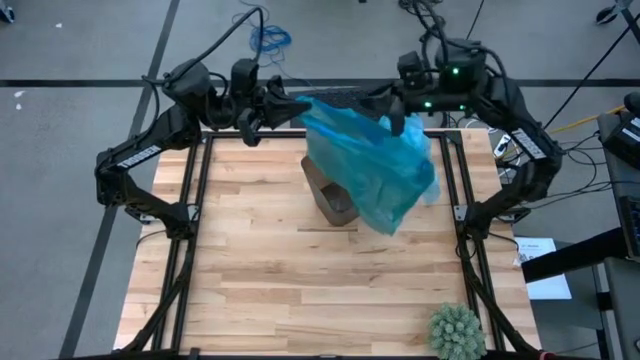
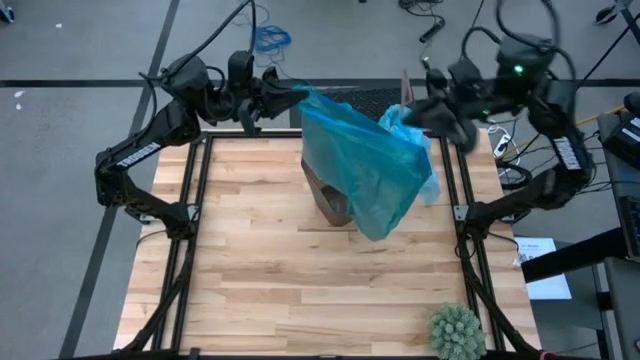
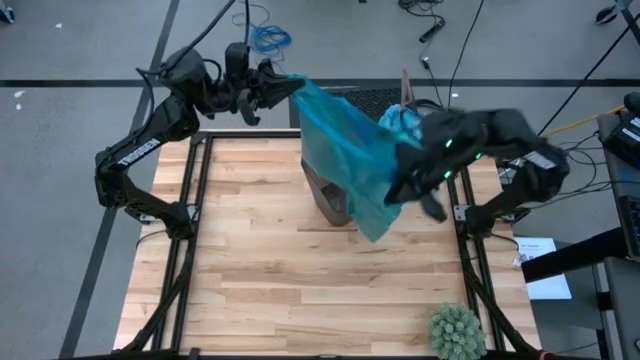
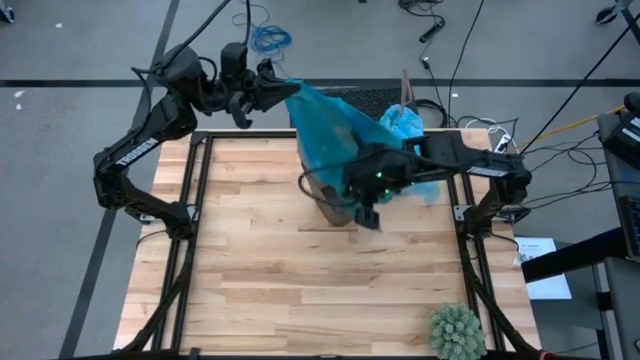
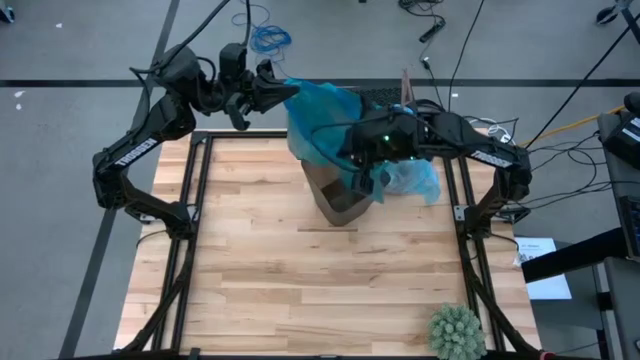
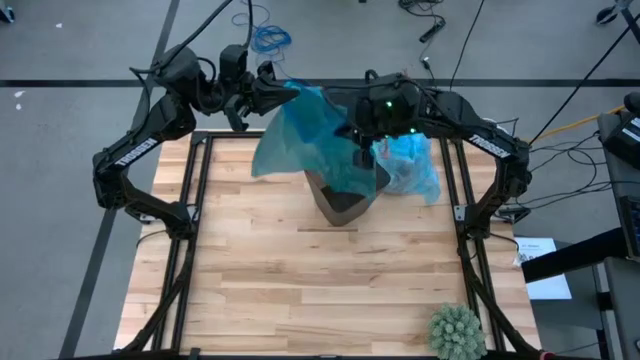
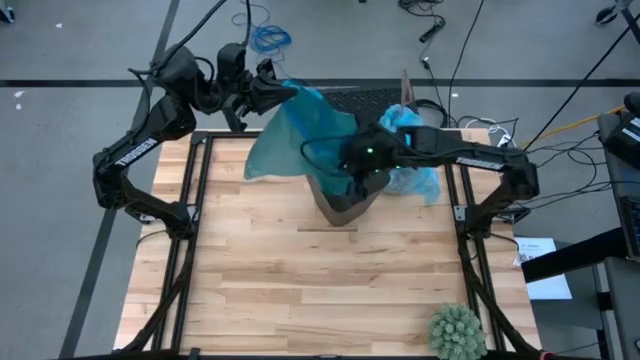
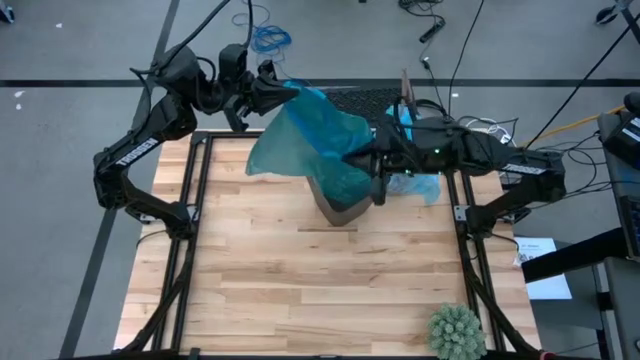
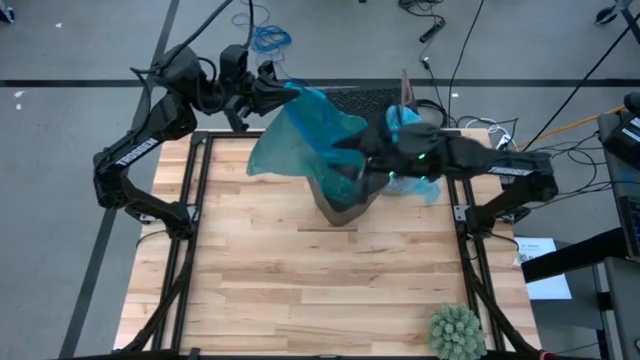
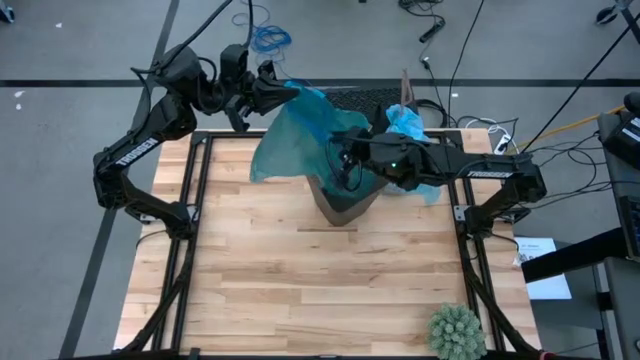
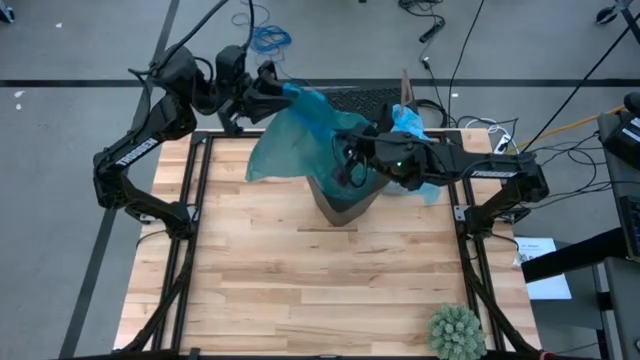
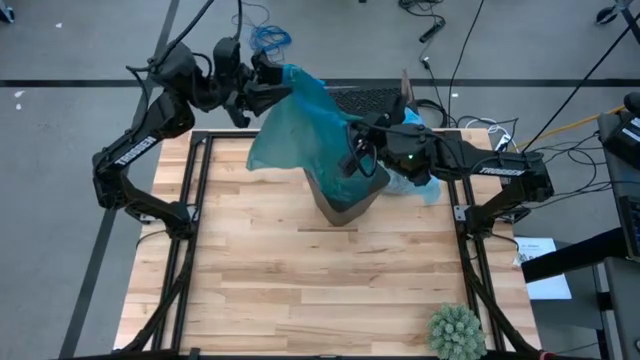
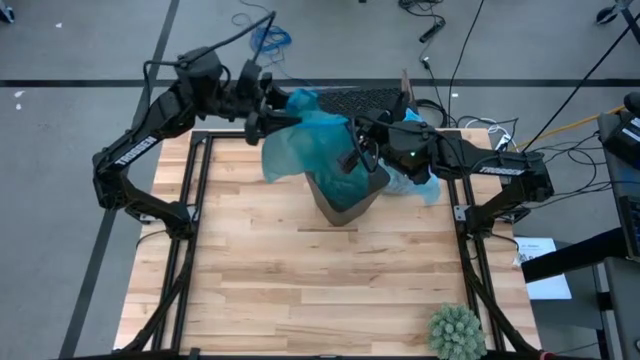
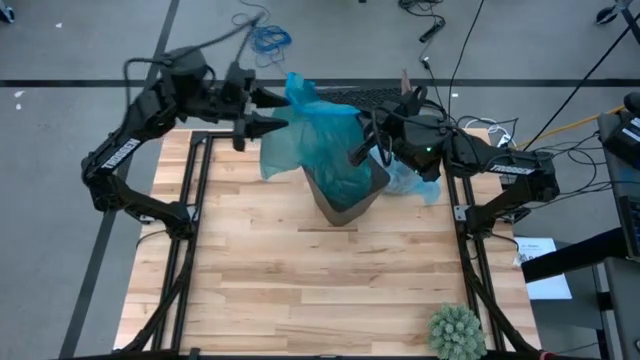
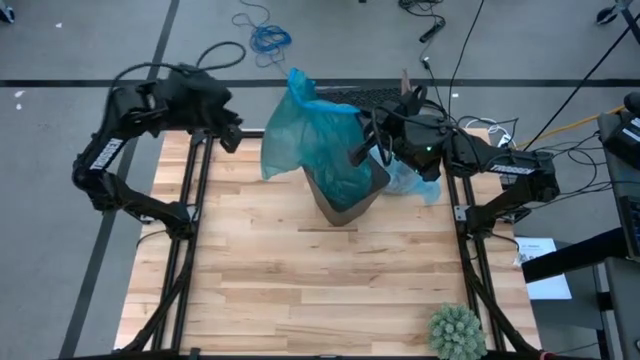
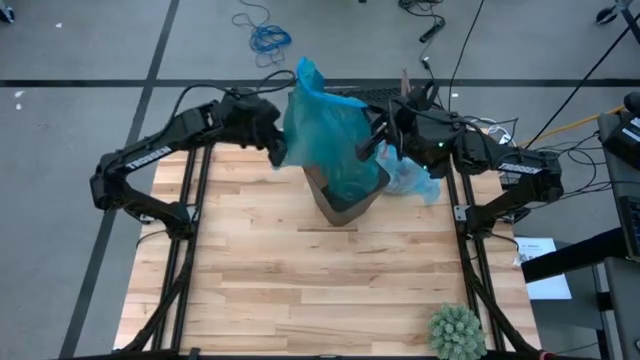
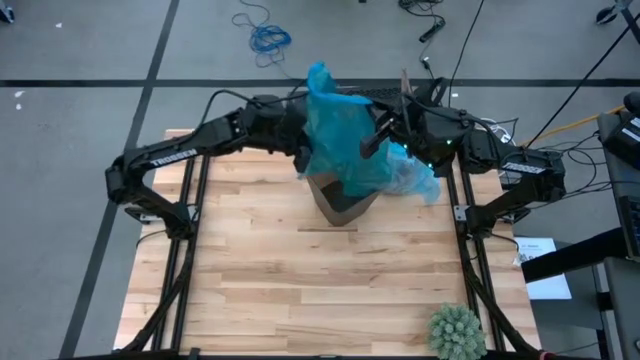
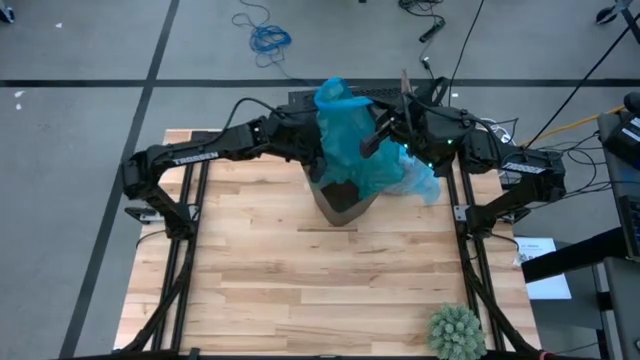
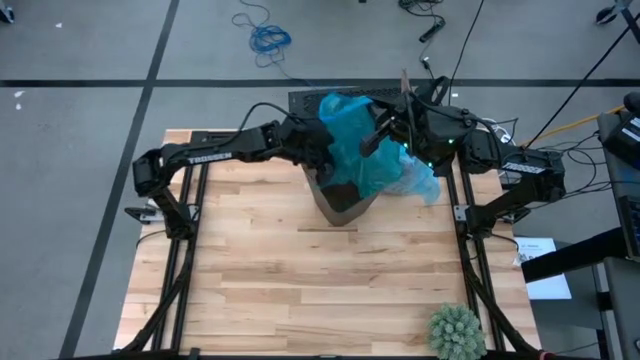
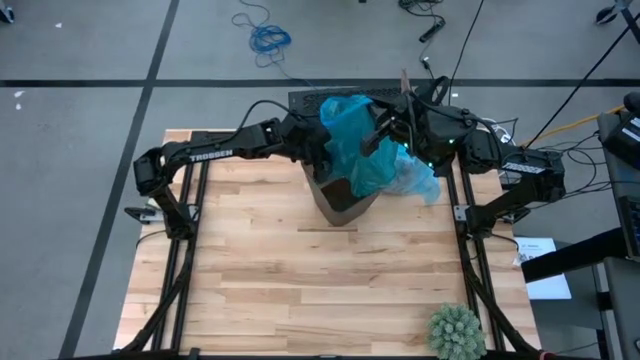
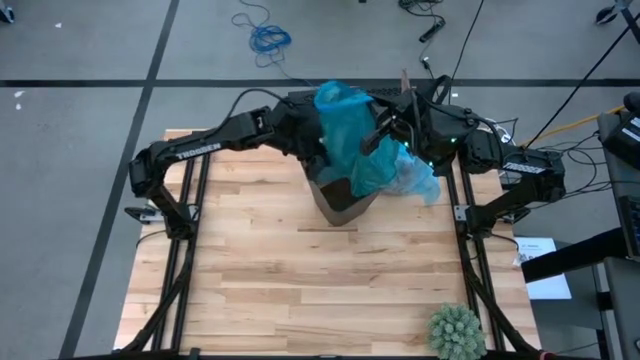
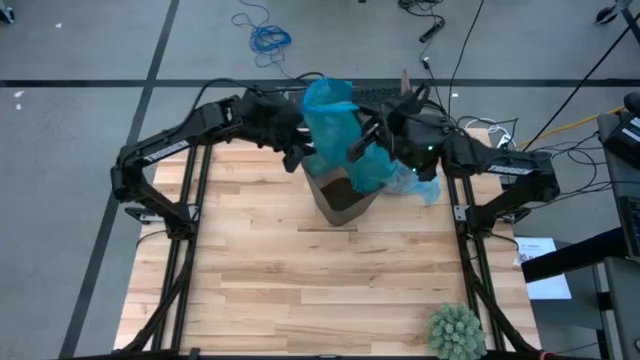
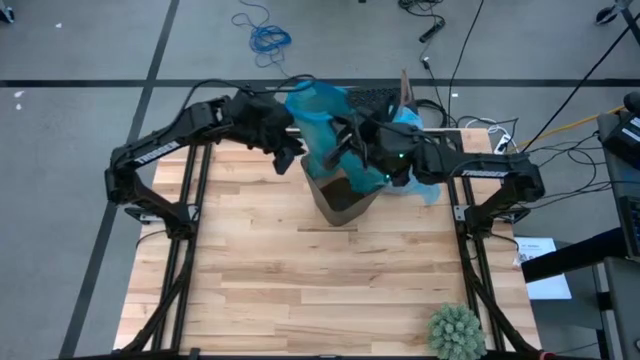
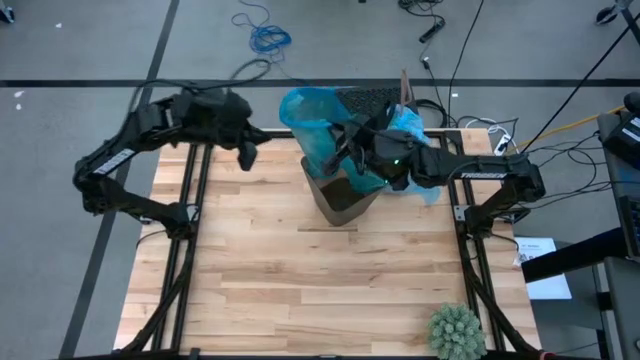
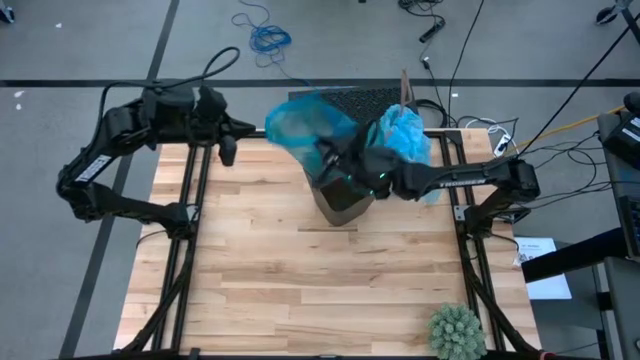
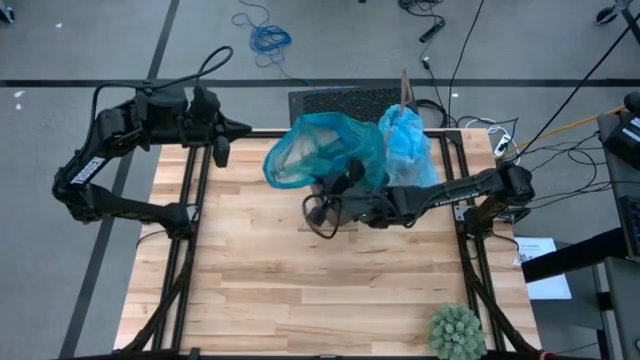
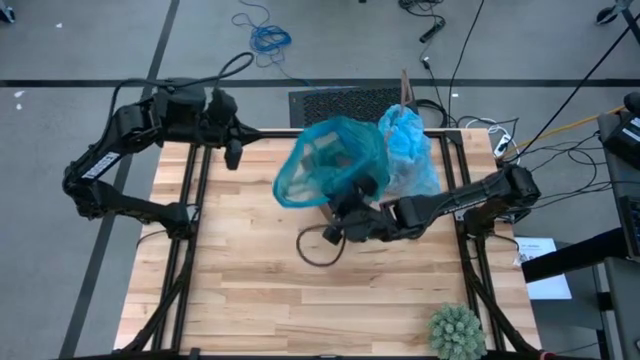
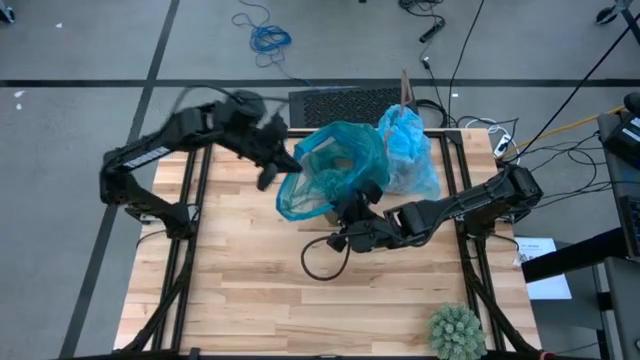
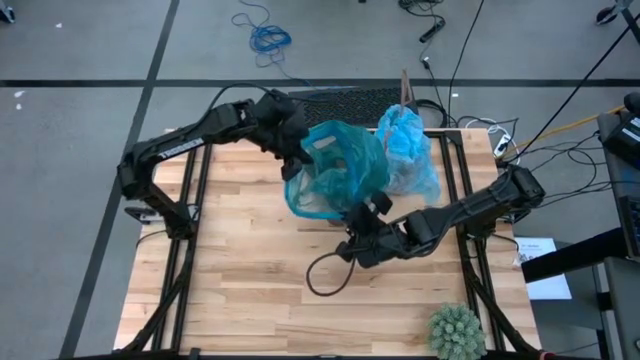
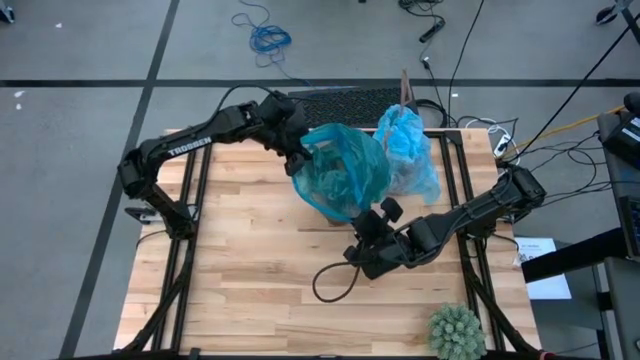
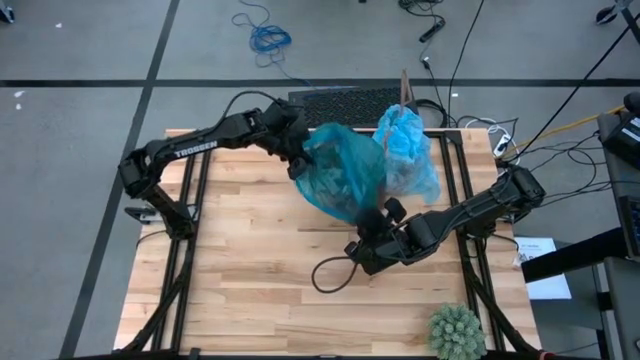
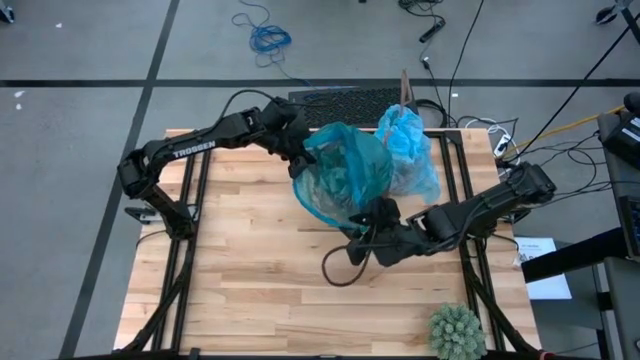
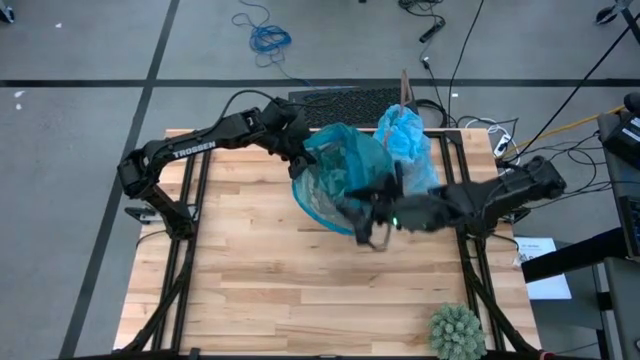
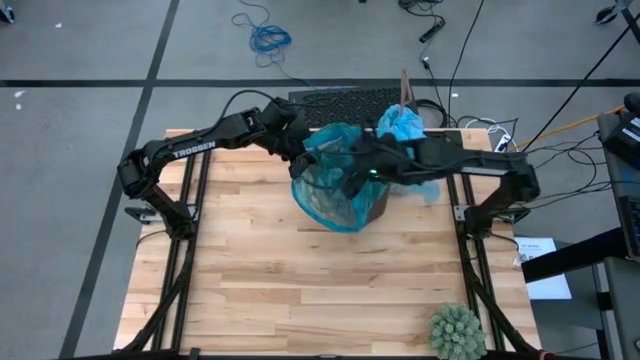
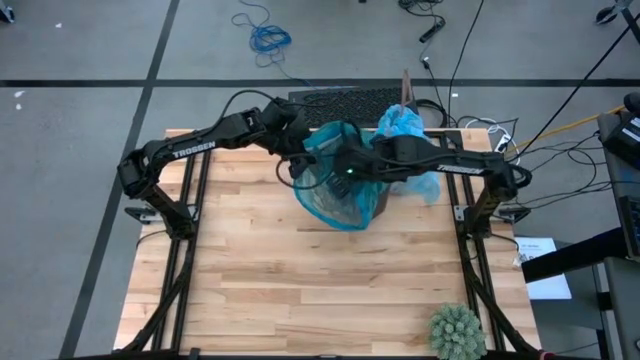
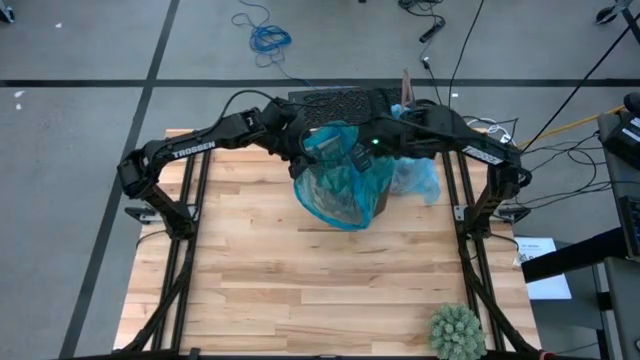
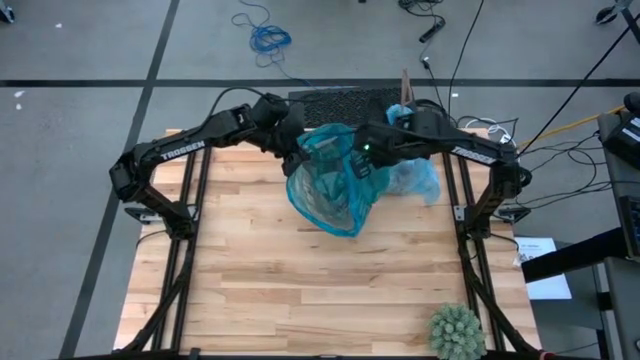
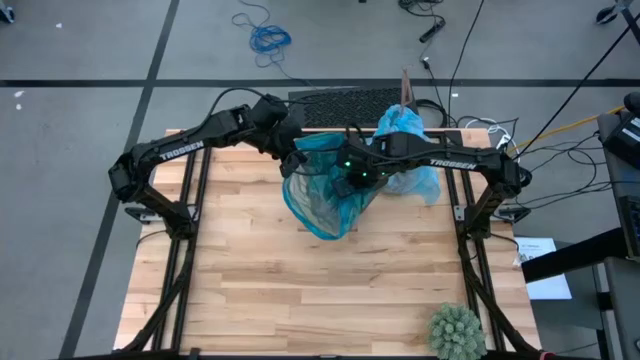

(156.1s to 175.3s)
Task: place trash/remove bag and relplace
Insert the dark blue trash bag into the trash bin

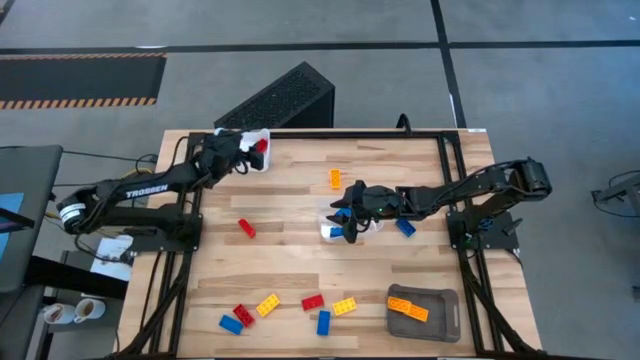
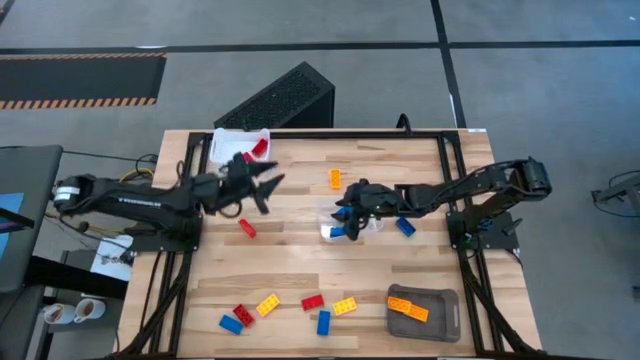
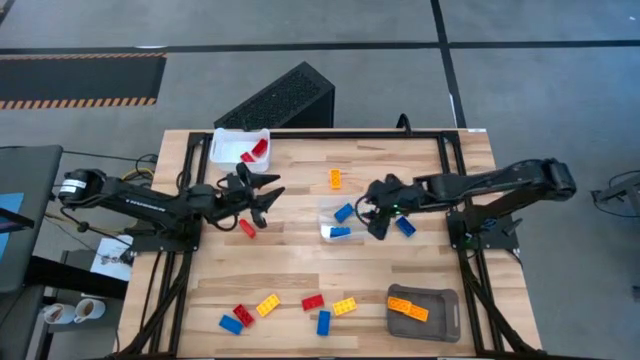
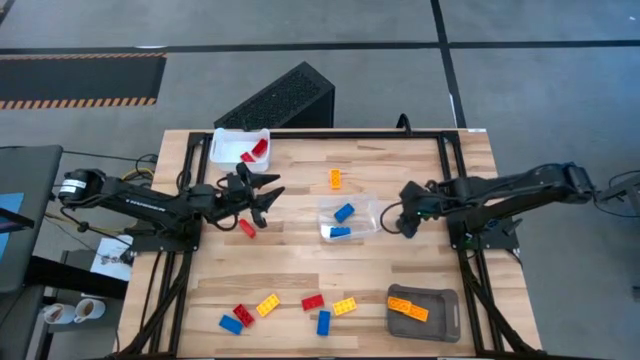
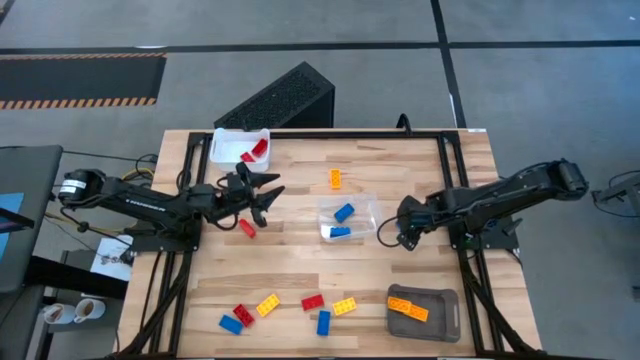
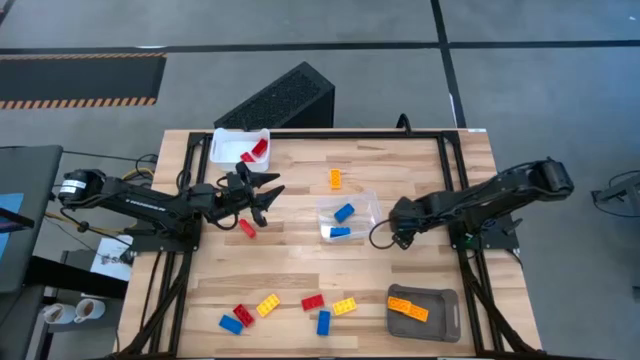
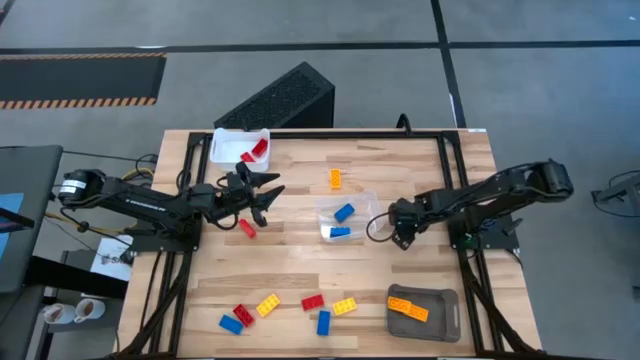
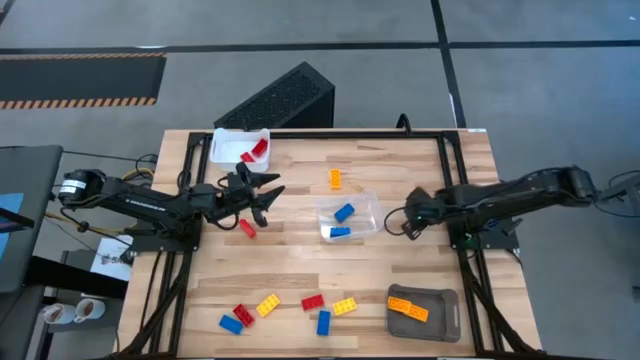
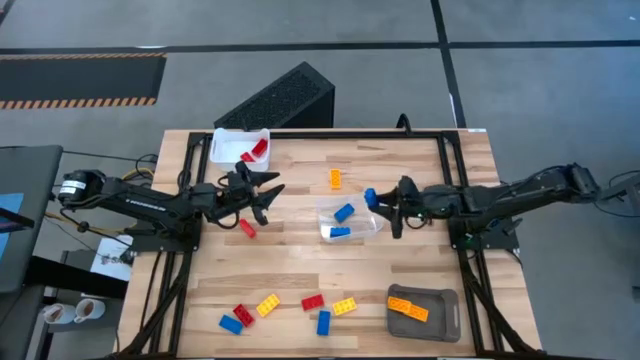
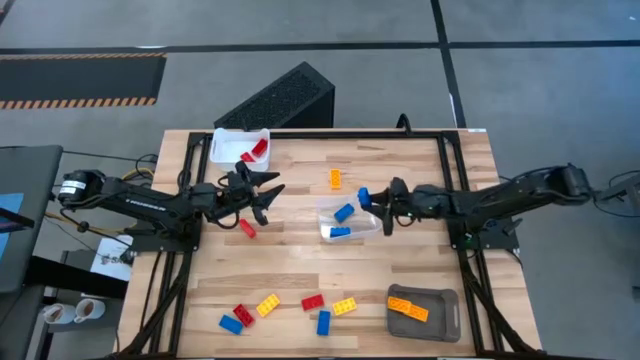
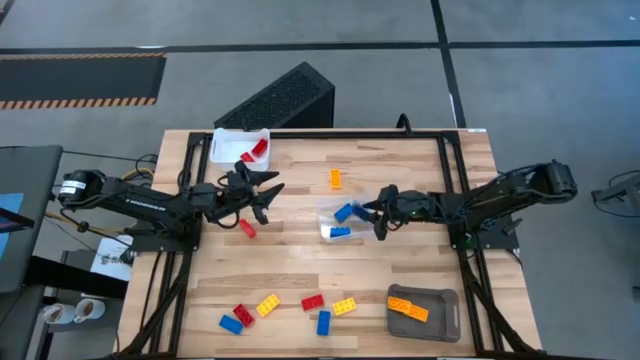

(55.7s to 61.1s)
Task: Sort & place blocks by color
Put the blue game piece into the transparent bin
